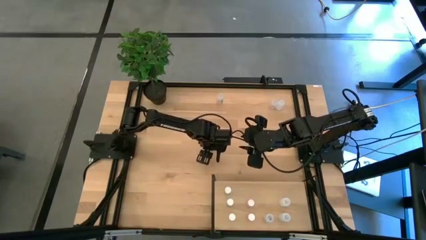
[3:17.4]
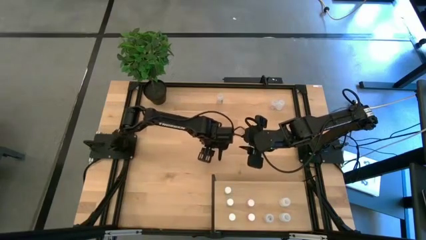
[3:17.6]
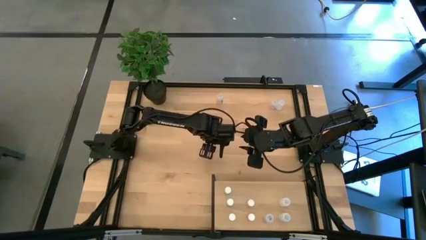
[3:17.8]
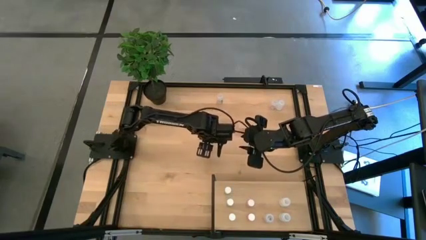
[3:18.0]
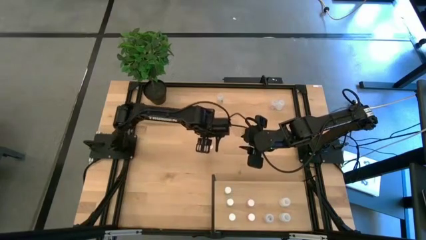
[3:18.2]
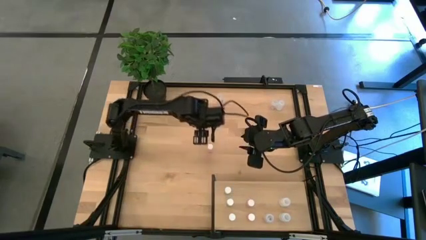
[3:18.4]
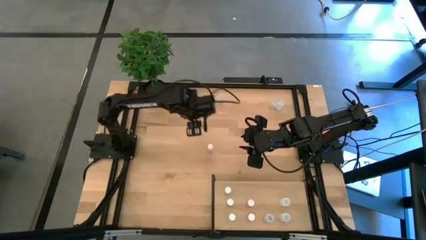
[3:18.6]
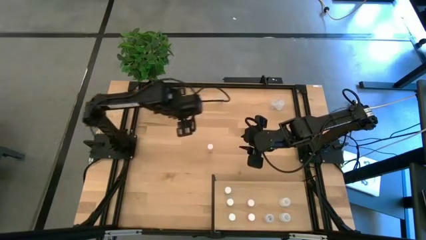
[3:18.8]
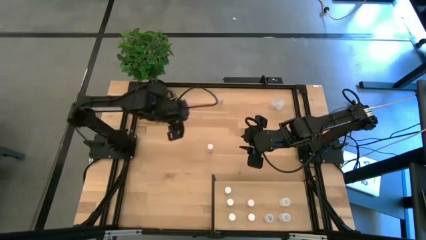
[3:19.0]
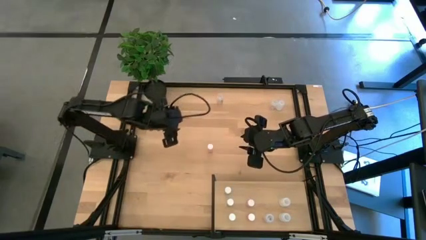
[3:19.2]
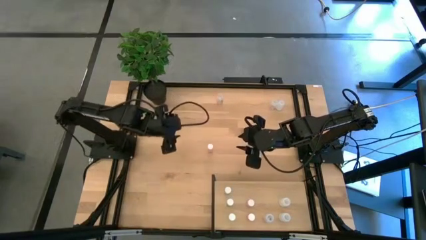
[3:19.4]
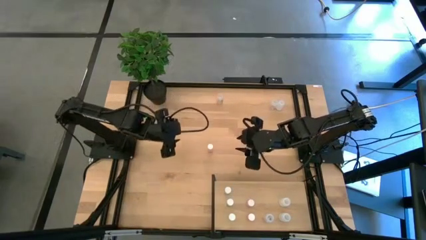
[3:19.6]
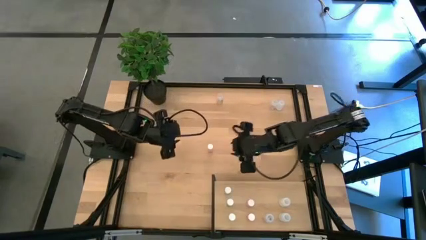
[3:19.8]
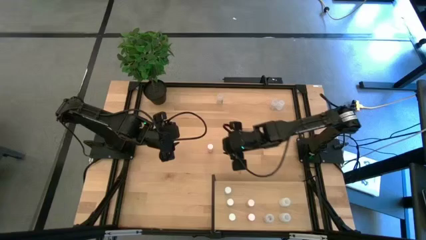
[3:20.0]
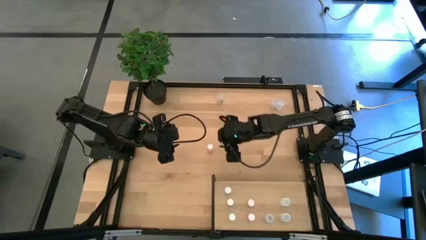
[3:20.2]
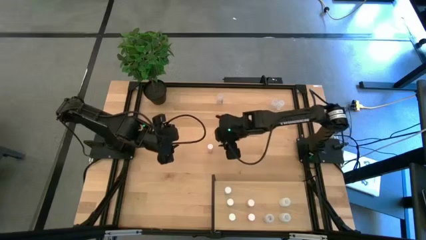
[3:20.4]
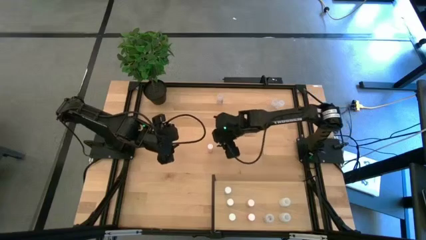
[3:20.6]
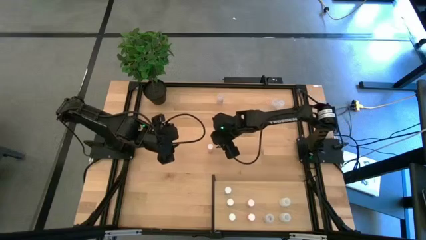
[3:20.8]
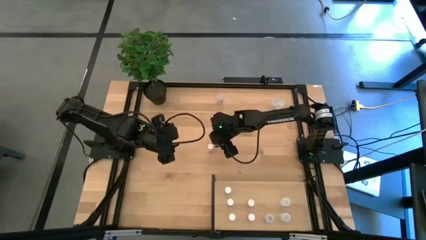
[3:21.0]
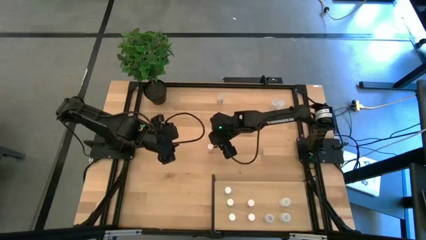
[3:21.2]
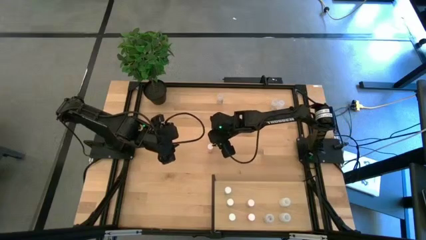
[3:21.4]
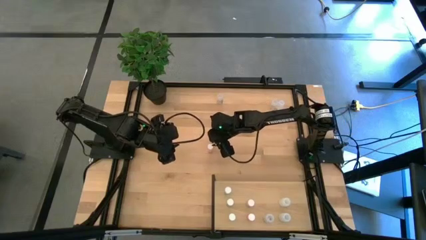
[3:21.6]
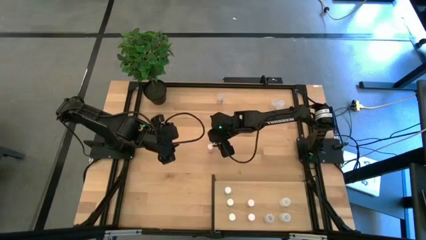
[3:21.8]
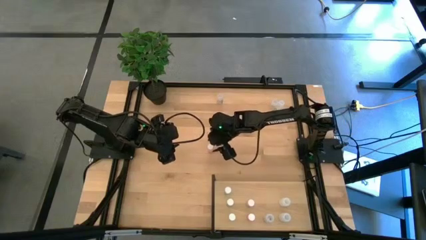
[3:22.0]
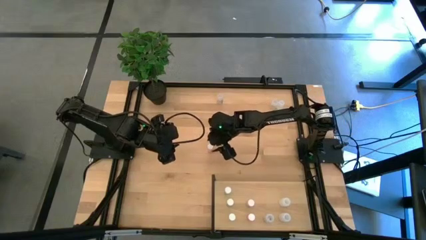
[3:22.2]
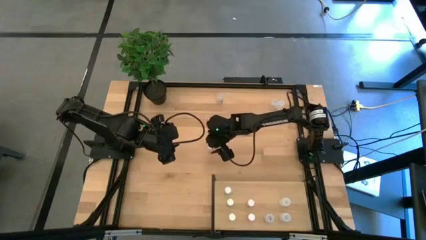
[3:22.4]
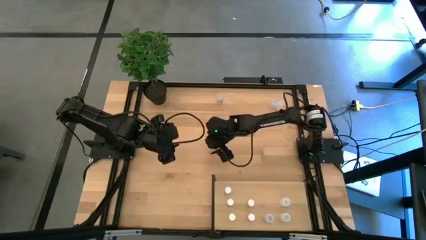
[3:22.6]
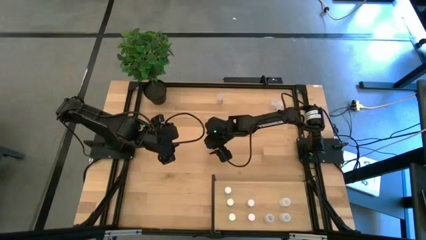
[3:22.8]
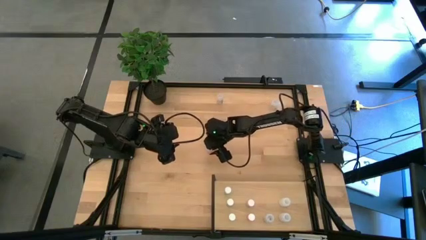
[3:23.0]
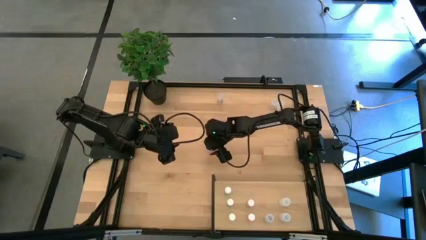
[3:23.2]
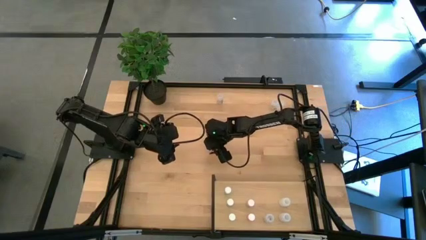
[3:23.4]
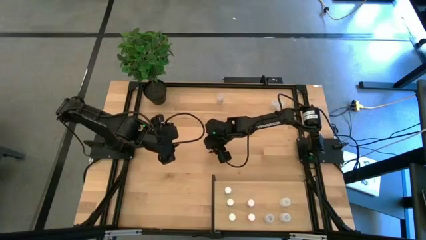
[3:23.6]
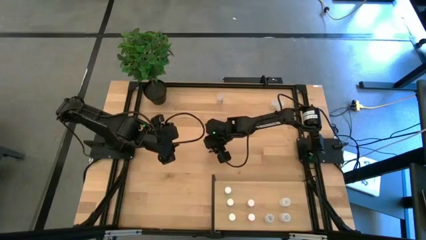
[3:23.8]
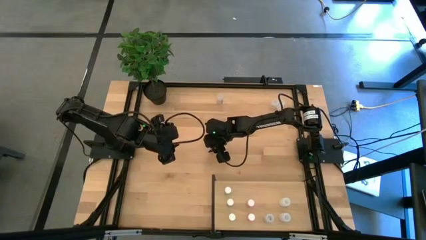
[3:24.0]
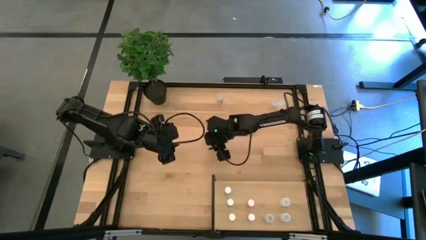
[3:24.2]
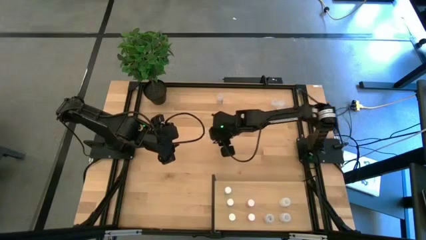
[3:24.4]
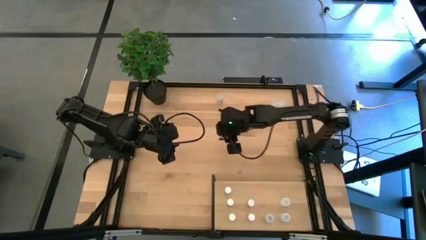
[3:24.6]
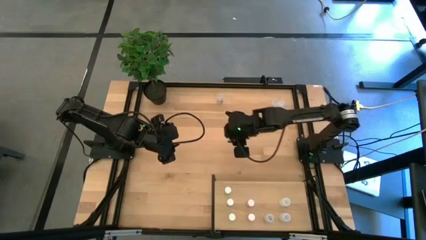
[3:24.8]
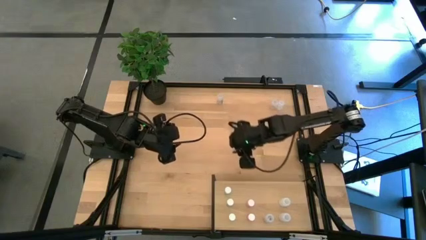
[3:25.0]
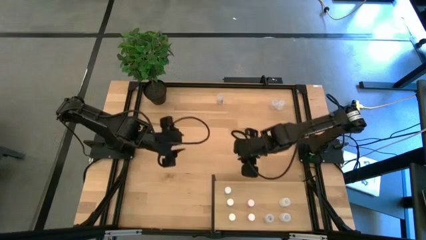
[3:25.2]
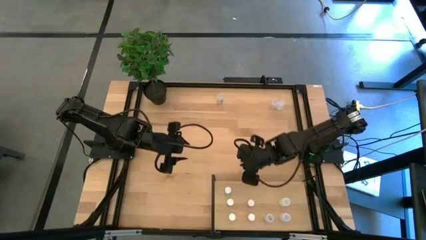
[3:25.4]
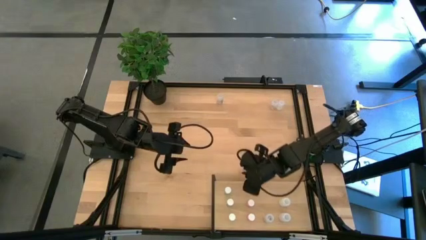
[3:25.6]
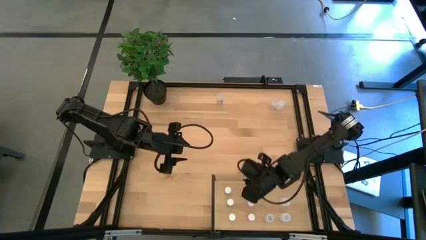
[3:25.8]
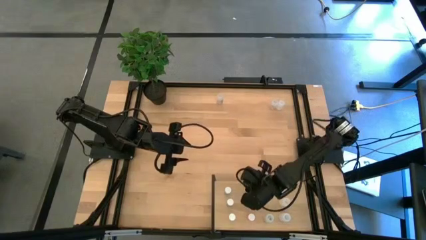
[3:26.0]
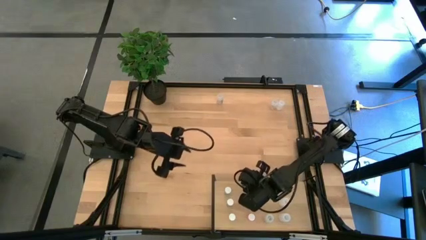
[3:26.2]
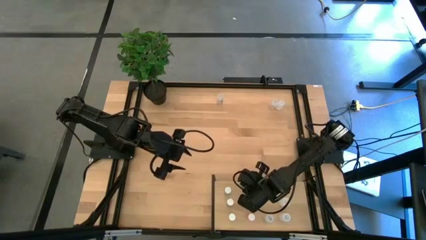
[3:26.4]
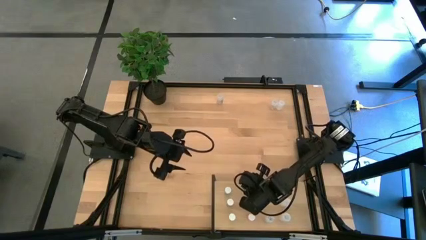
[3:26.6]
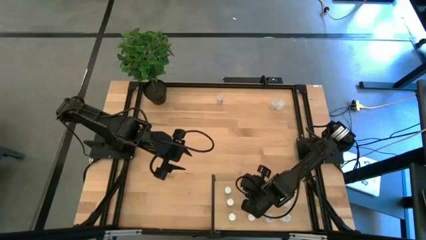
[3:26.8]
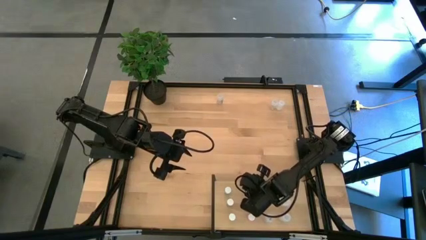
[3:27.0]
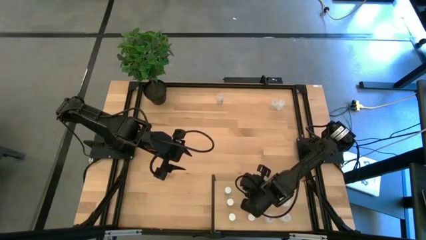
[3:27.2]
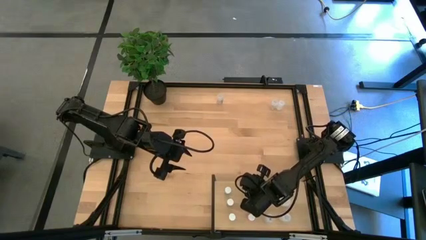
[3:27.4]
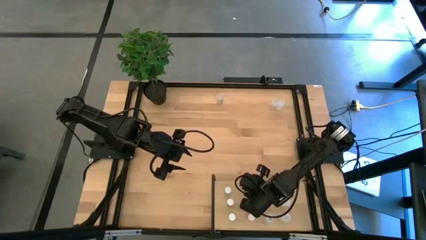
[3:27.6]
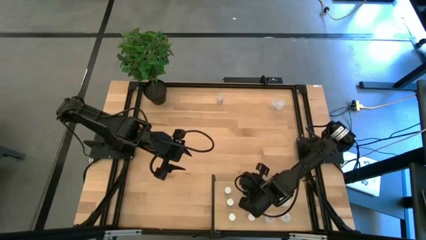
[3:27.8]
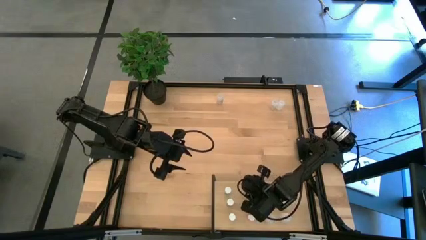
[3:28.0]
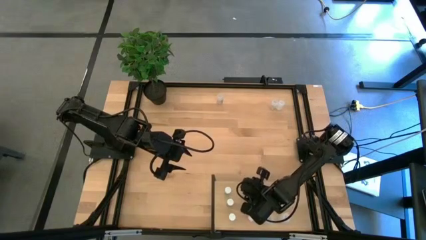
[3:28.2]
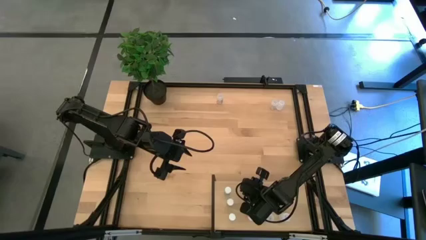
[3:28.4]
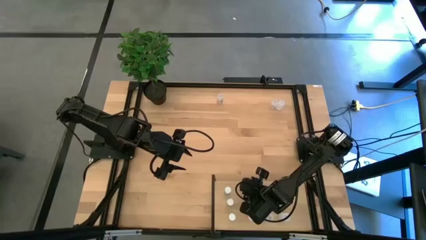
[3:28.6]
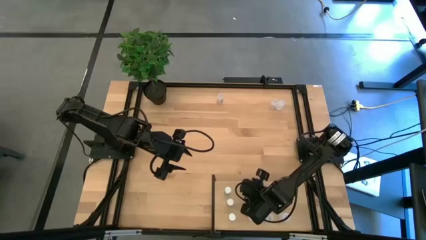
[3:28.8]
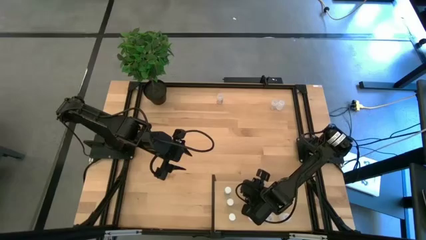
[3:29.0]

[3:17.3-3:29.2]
Task: Pick and place medicine bottles onto shelf by color
Put the pink pill bottle on the shelf aligned with the other pink pill bottles
